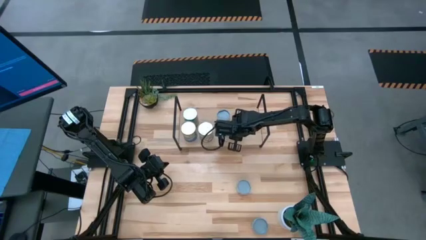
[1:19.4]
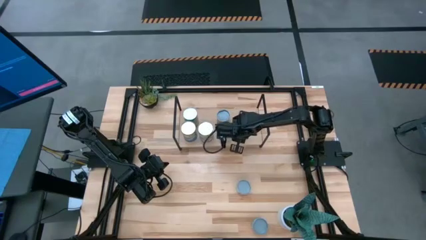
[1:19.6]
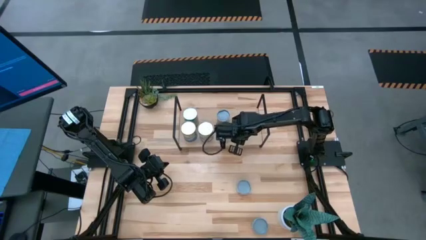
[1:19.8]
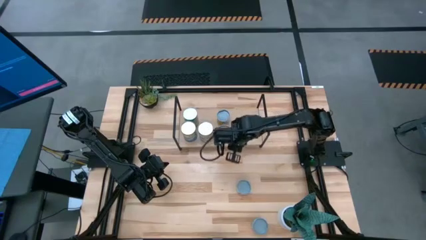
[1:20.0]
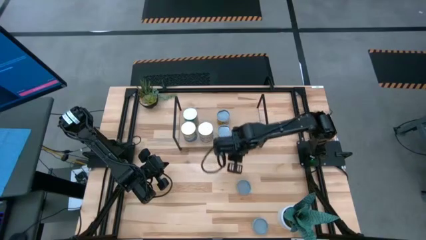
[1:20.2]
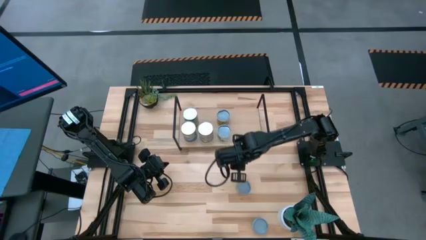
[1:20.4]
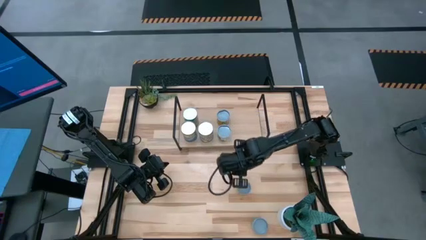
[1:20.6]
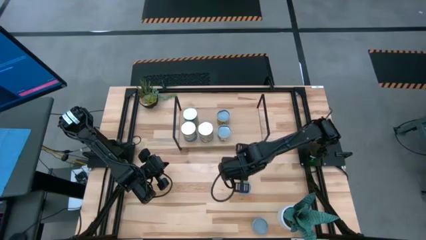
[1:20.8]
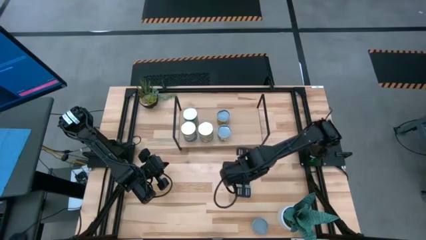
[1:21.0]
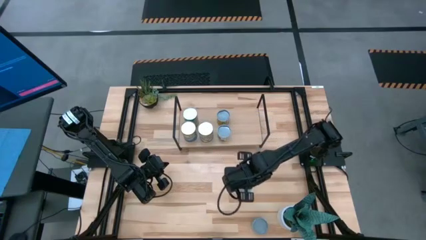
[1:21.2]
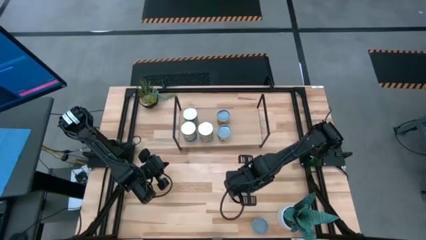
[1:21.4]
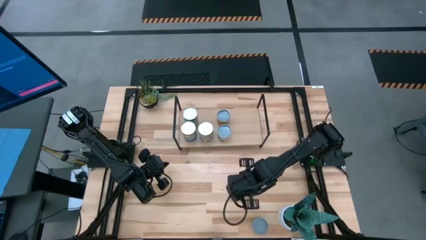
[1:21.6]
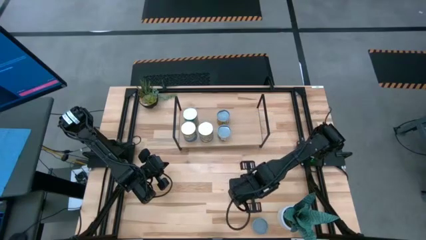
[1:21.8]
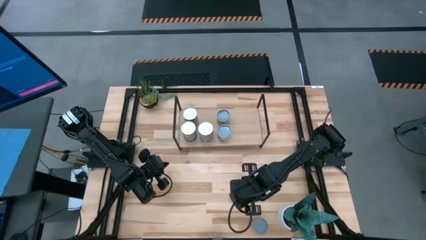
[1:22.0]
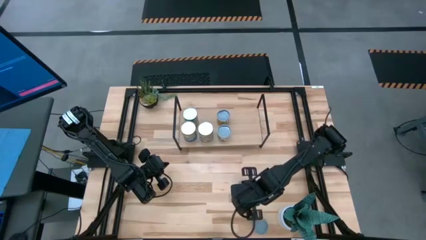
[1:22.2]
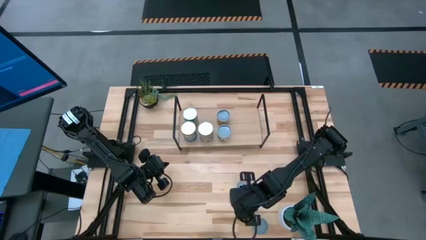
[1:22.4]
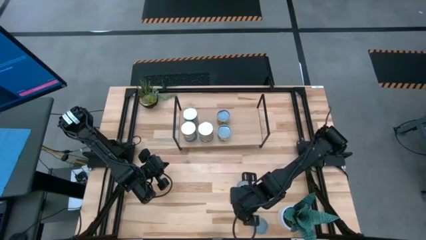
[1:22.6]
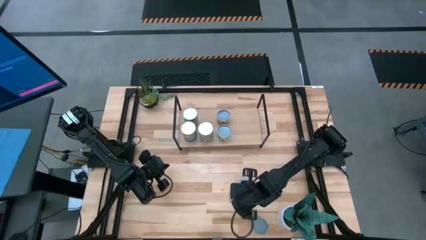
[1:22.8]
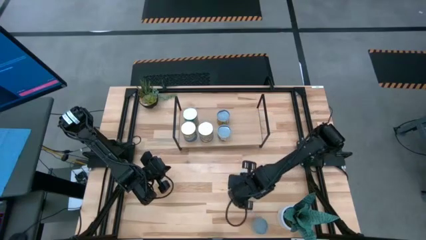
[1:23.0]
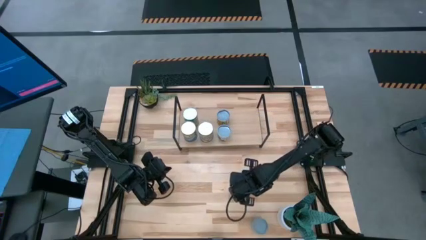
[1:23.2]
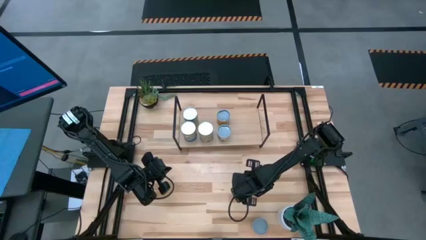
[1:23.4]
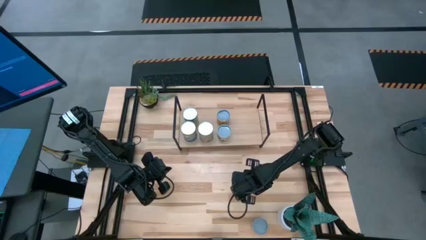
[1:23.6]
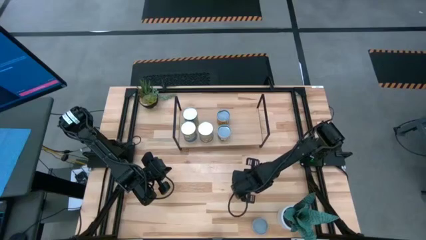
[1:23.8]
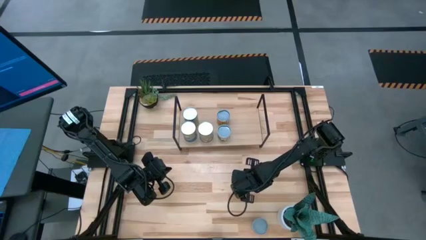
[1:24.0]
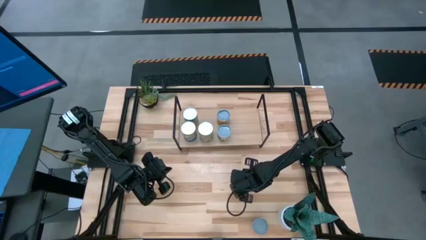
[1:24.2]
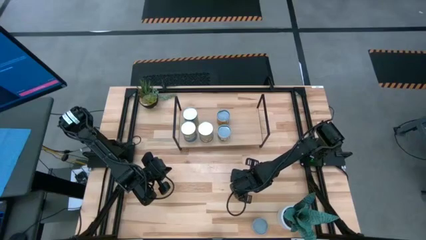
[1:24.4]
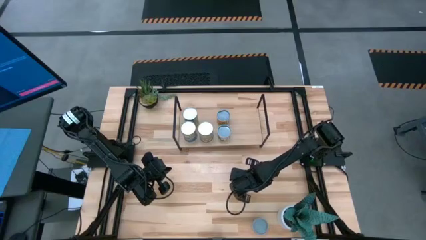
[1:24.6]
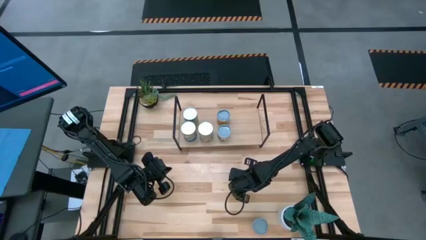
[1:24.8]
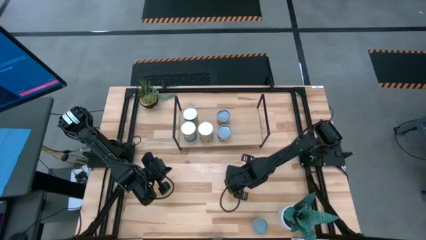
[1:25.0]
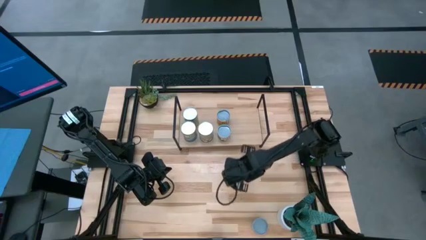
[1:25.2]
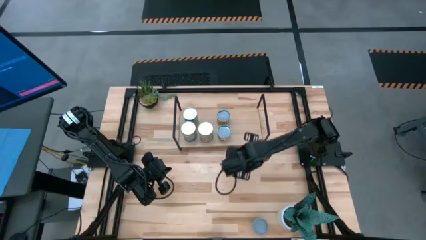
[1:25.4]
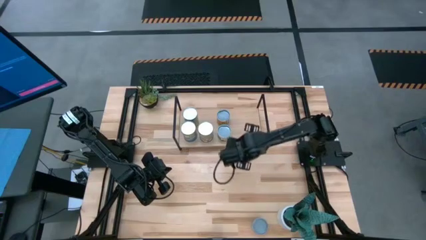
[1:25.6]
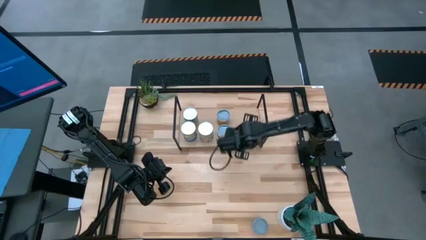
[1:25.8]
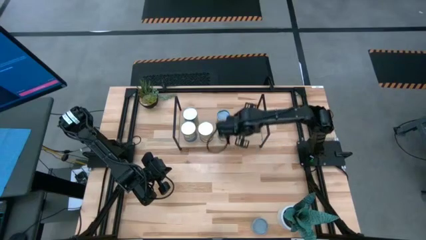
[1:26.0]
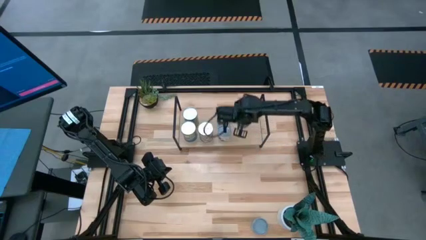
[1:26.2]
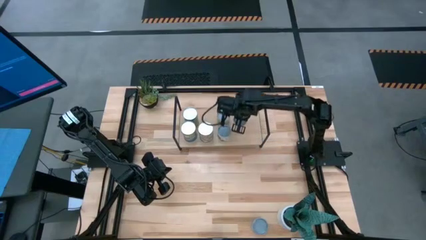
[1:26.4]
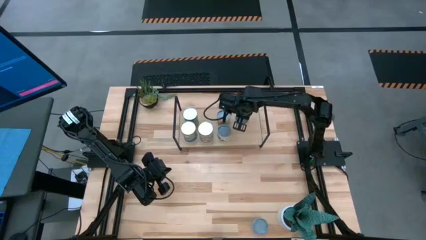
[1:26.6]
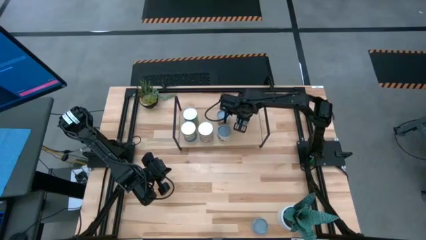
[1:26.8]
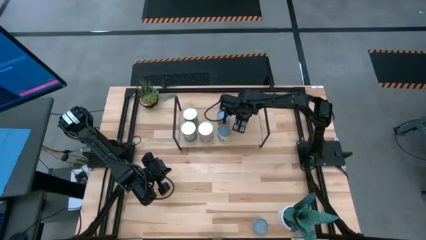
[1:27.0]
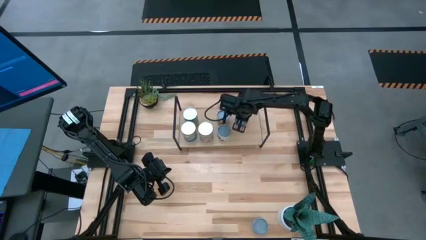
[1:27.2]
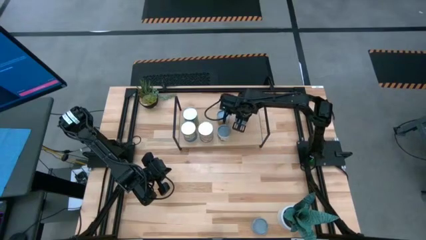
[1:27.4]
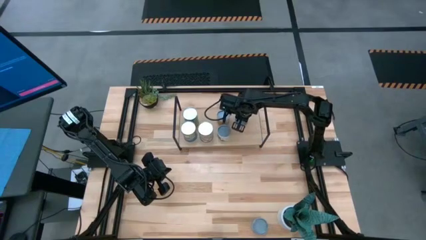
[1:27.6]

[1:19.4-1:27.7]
Task: Pick and place cans onto a shelf
Put the canned mushrooms on the shelf

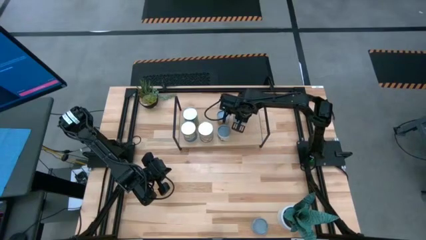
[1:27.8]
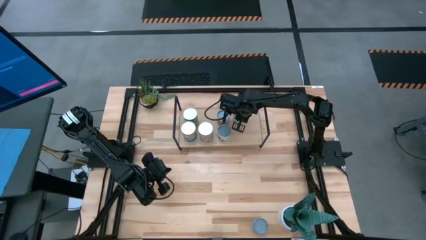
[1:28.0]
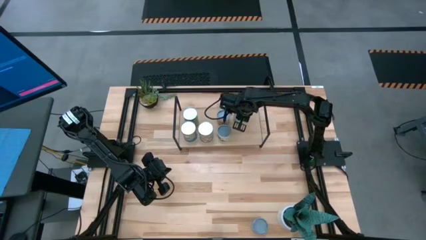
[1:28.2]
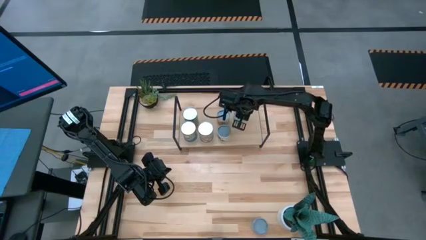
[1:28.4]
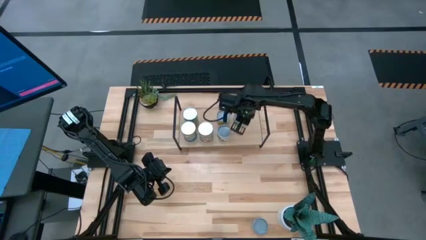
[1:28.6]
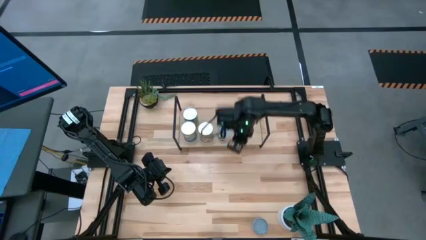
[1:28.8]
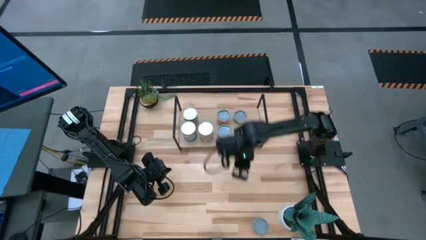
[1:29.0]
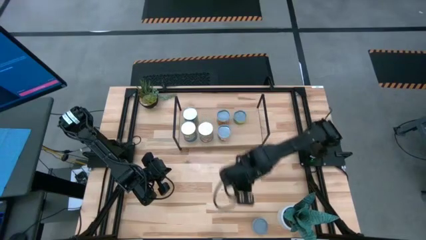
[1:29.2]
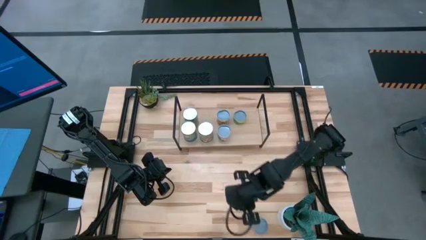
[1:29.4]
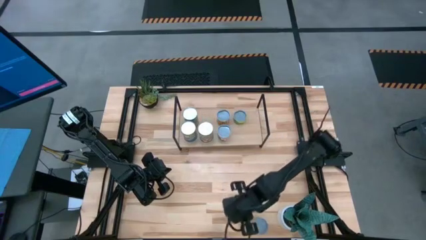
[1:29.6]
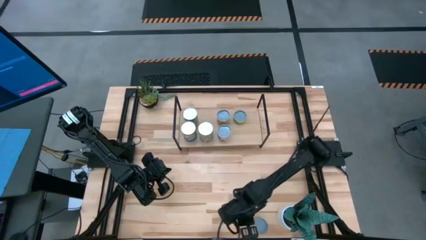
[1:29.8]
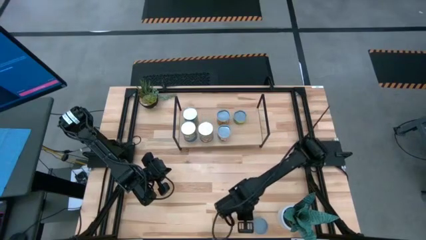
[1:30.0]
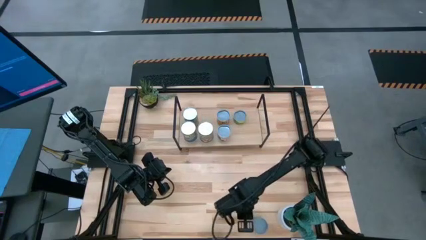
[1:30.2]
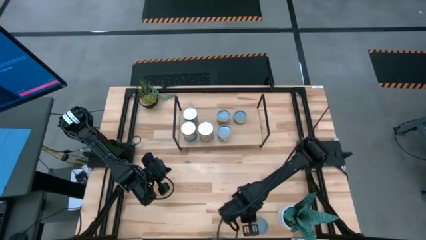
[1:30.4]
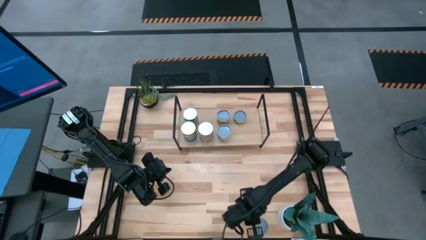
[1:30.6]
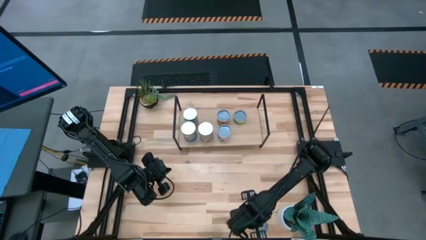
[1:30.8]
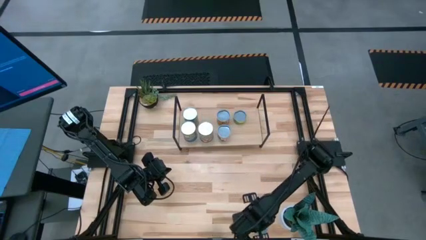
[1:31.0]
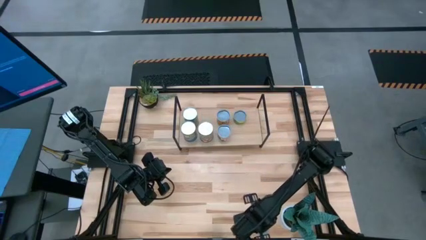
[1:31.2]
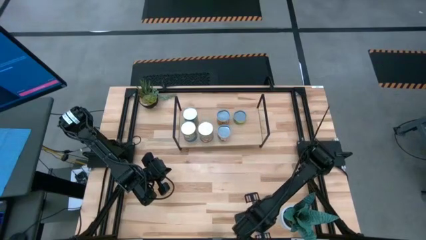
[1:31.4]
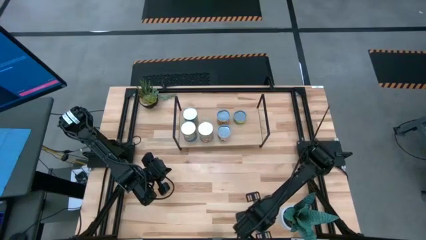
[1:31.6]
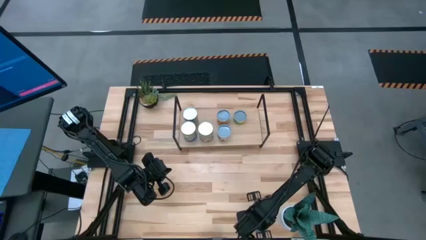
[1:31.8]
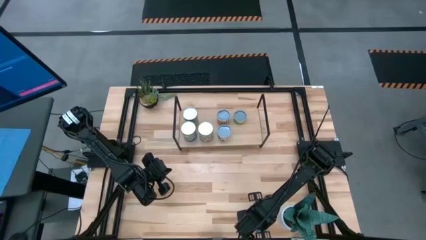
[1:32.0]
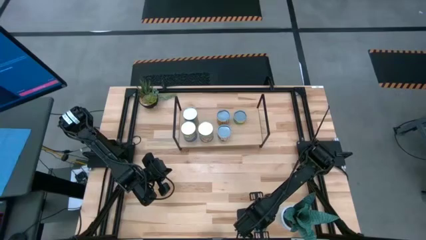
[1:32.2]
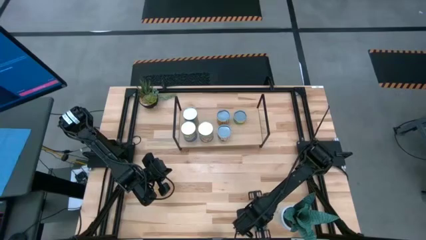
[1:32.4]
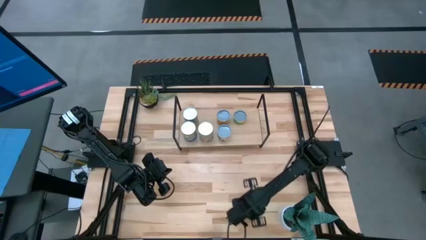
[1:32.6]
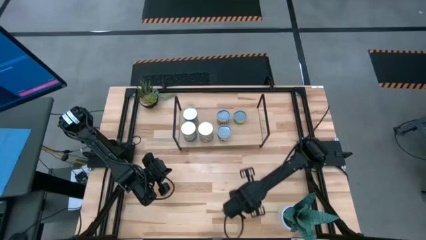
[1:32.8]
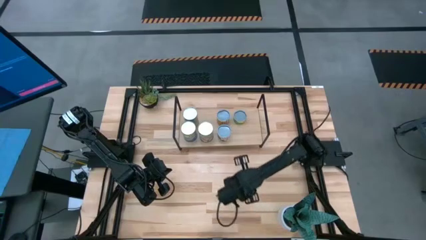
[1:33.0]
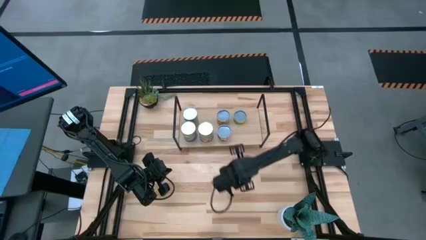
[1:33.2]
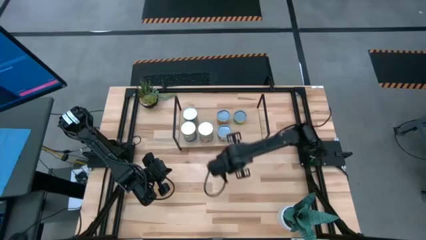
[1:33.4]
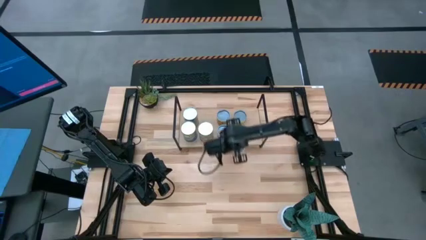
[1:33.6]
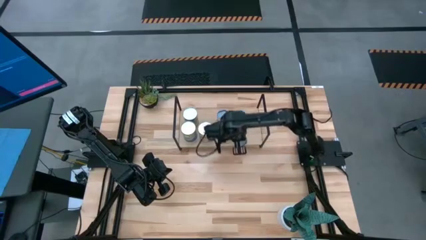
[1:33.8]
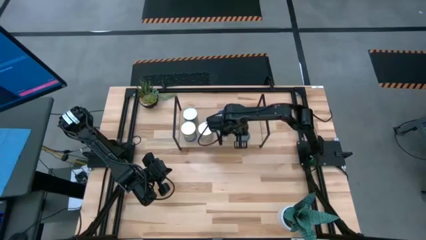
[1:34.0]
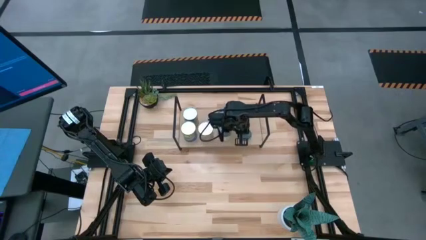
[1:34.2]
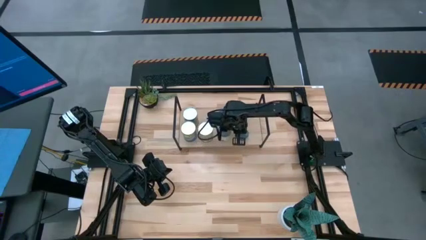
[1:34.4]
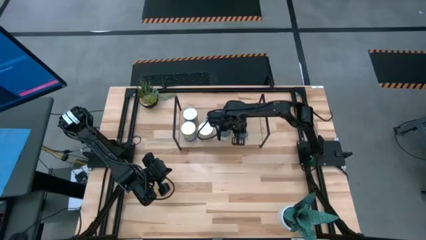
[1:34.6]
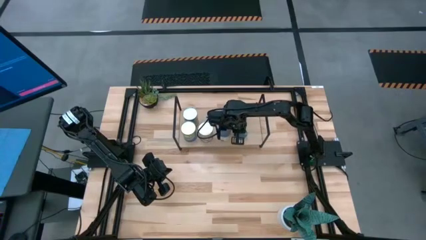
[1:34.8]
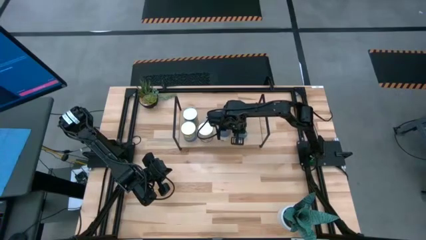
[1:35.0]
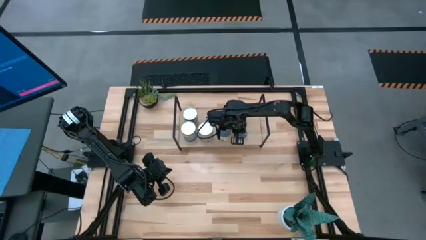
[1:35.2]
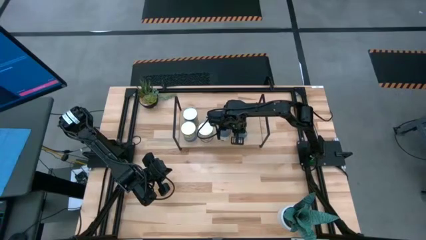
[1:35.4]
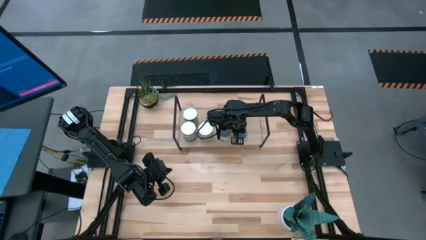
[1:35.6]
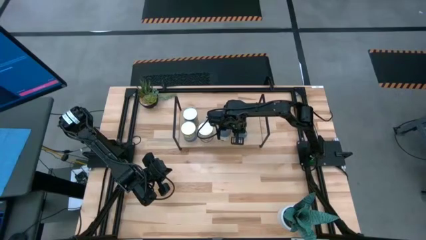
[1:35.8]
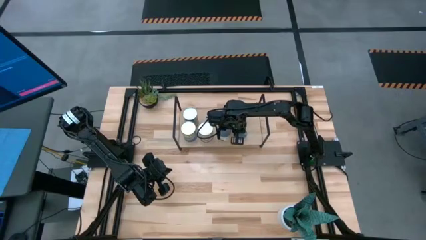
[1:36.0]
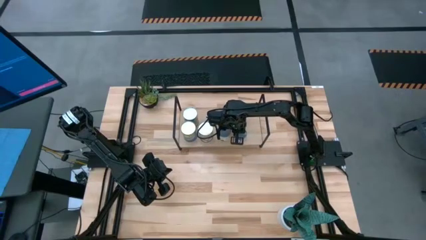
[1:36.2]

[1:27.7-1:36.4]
Put the canned salmon on the shelf

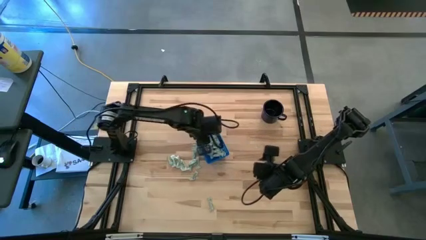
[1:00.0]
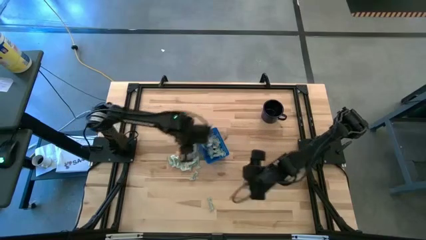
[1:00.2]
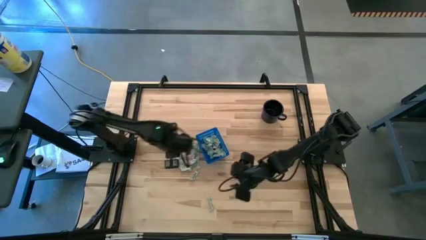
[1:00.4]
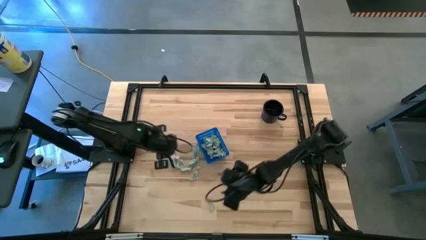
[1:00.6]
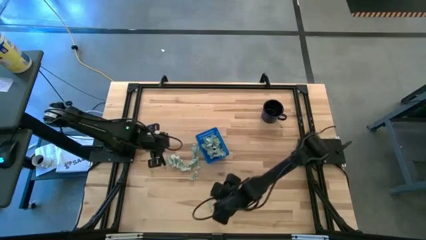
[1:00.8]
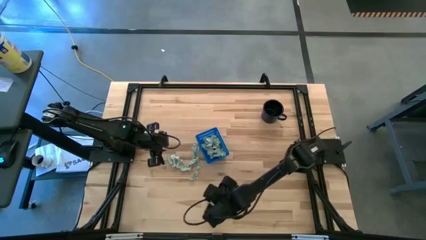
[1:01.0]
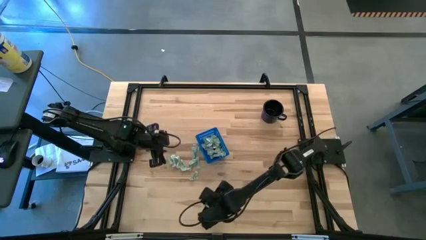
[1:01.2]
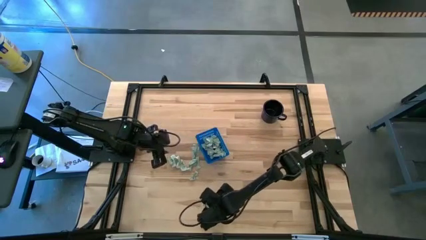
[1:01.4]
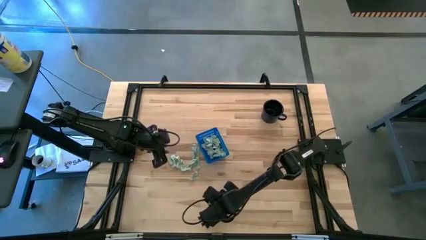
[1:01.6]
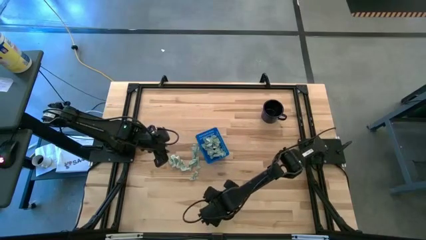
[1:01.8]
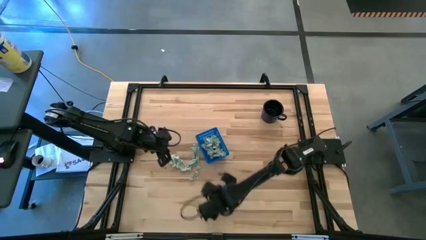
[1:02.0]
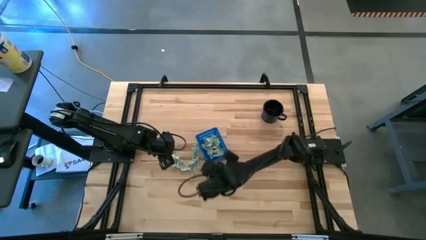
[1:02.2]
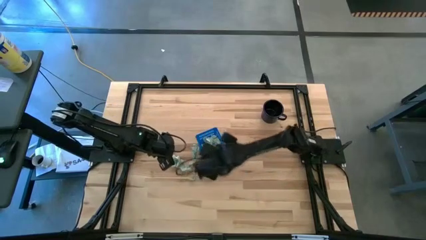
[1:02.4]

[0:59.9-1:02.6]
Task: Pick and place Stevia / Truvia into bins
Put the stevia packet into the basket
